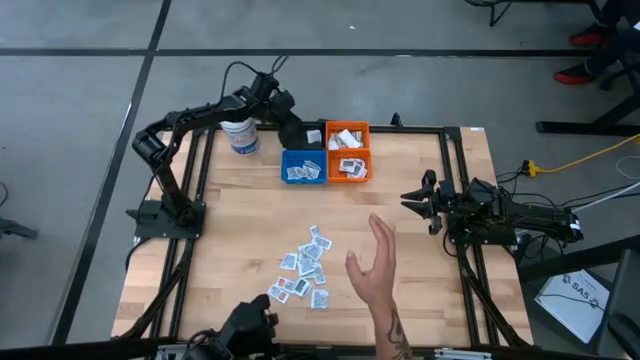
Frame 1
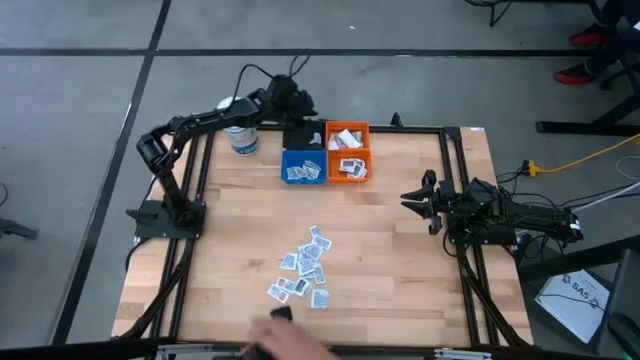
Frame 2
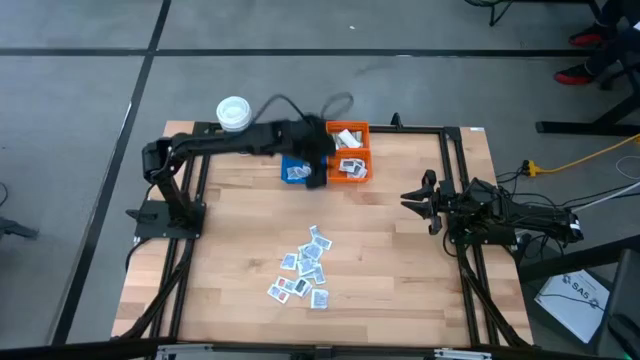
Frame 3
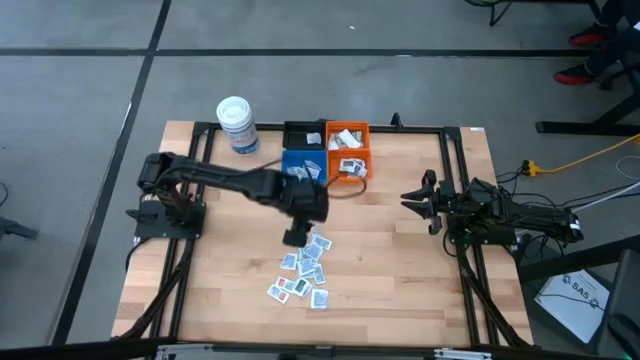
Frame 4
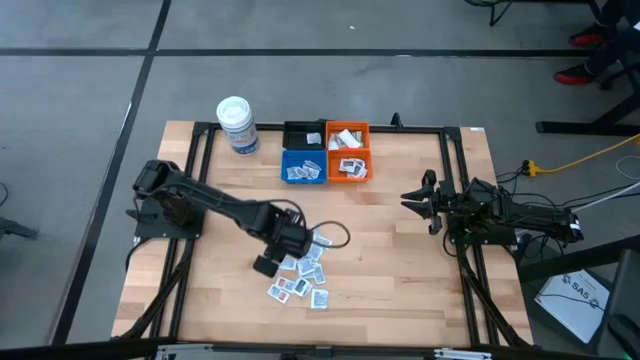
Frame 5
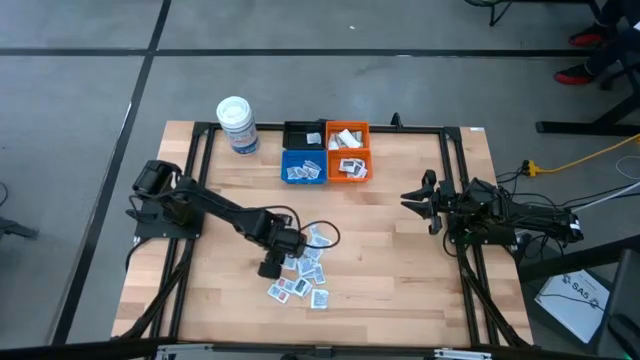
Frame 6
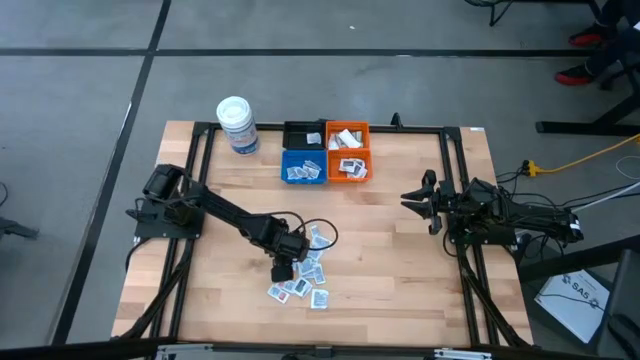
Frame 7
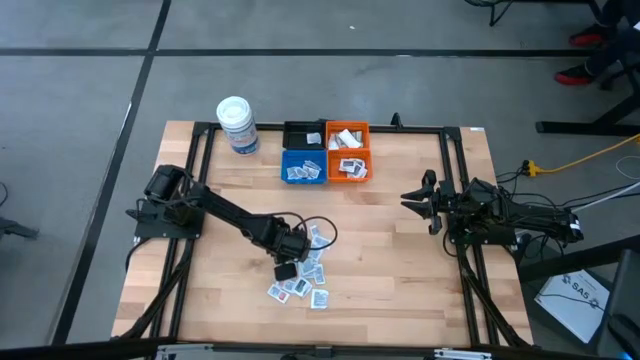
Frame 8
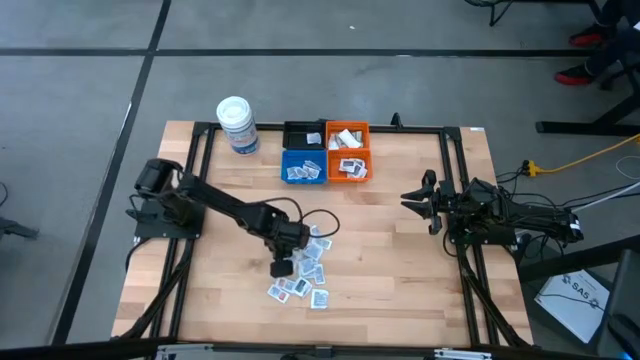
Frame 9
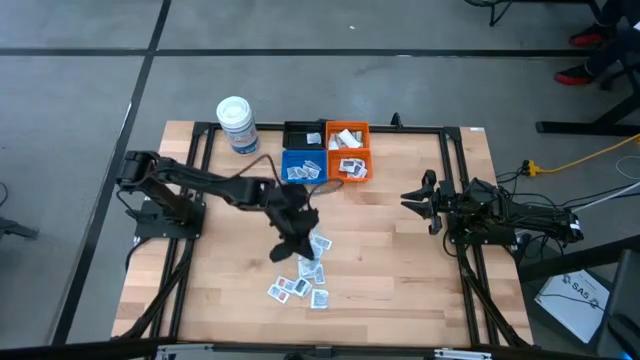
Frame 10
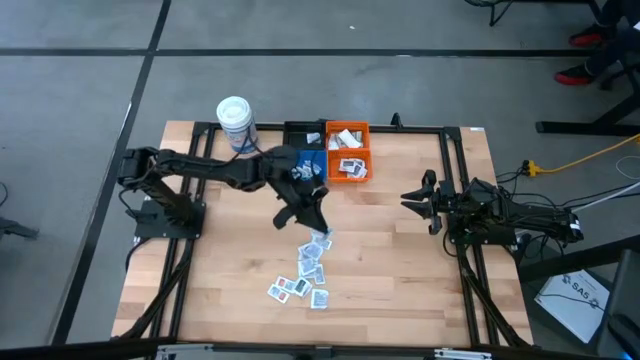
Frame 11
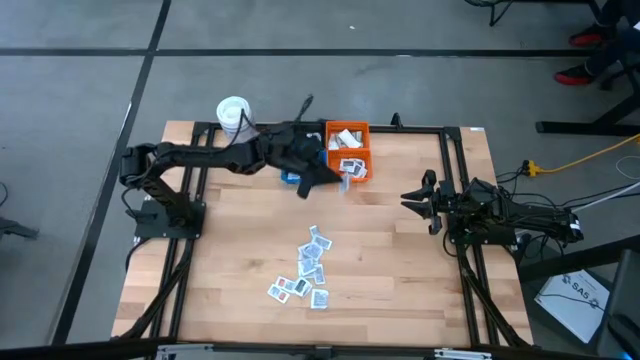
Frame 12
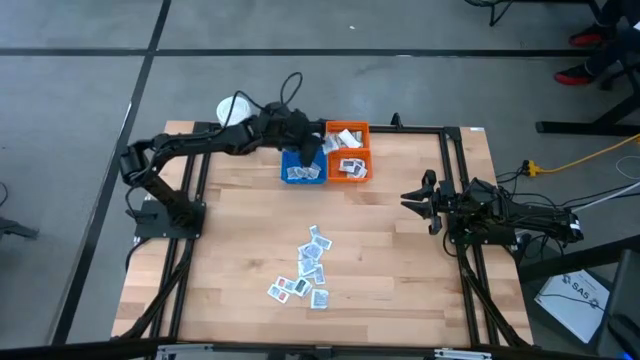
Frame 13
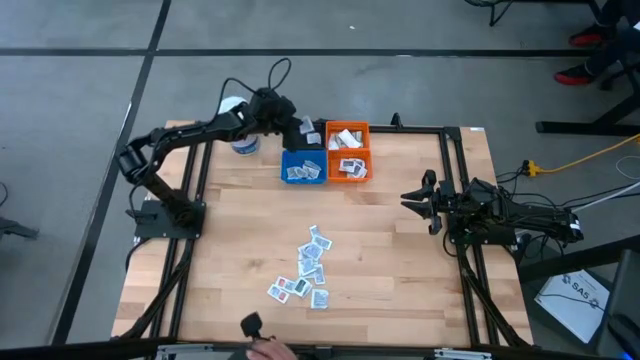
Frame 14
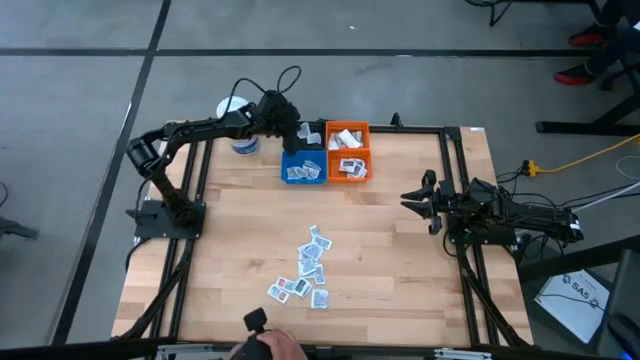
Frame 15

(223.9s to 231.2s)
Task: Pick & Place First Aid Supplies
Put the alcohol pad into the black bin

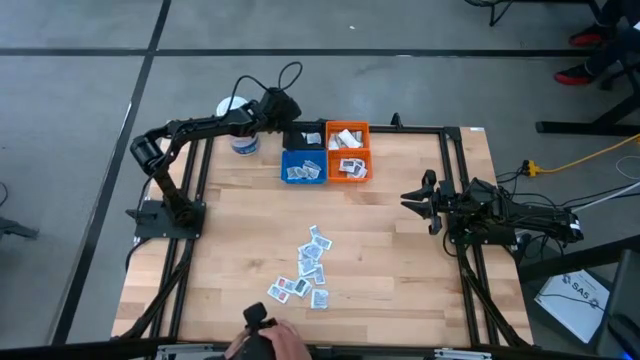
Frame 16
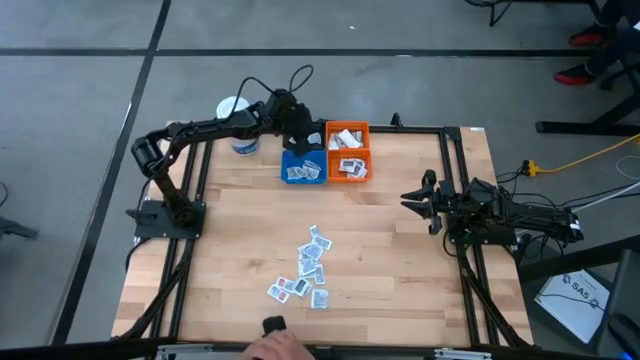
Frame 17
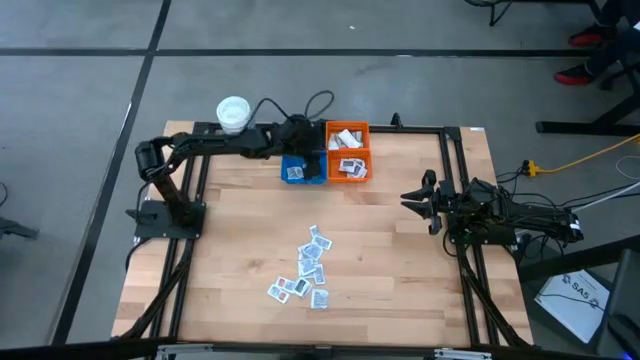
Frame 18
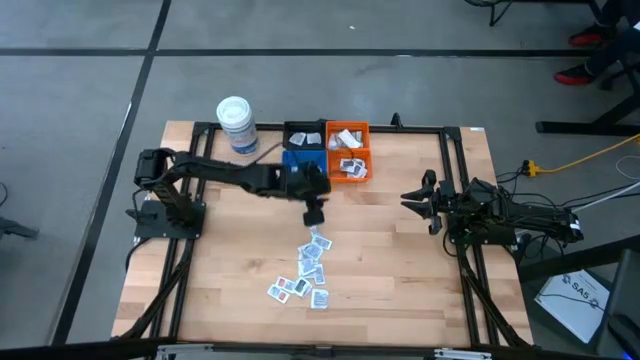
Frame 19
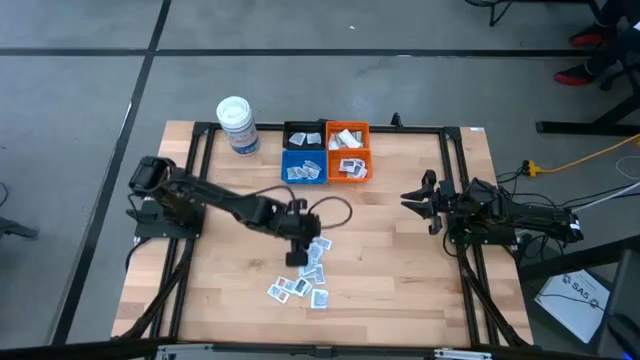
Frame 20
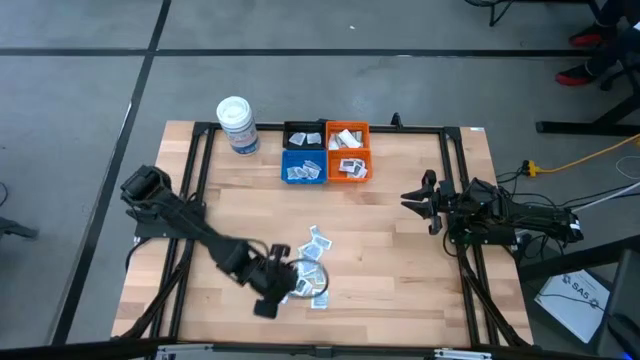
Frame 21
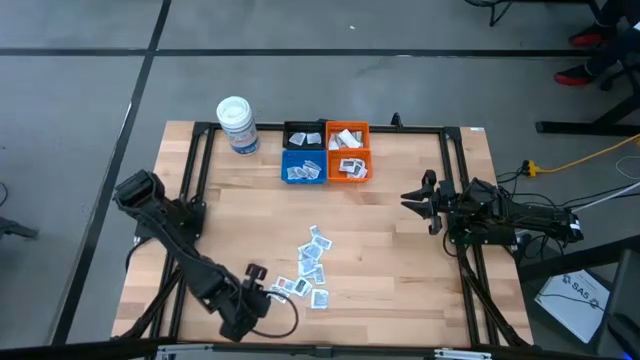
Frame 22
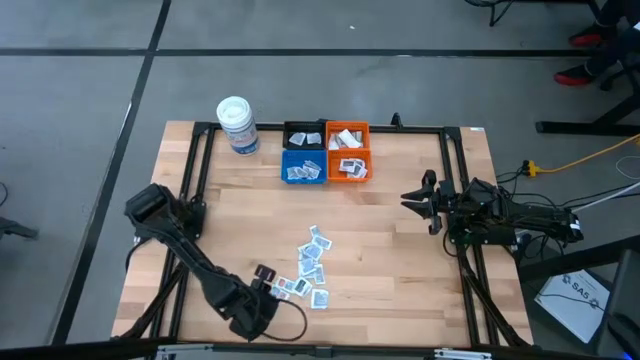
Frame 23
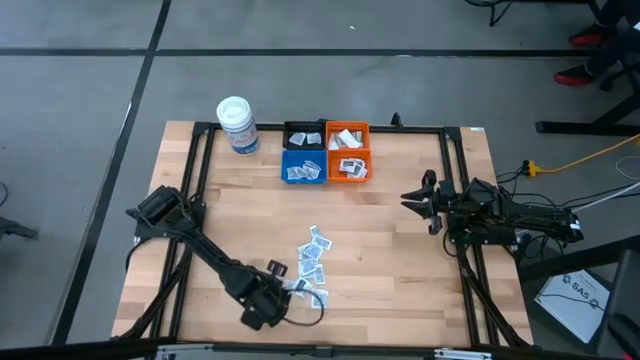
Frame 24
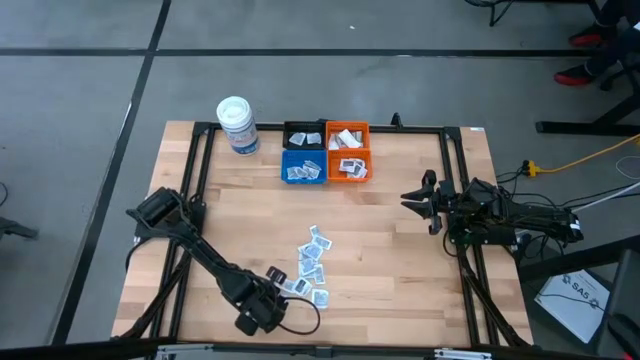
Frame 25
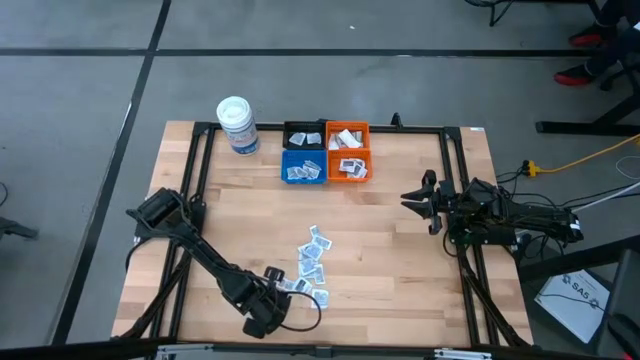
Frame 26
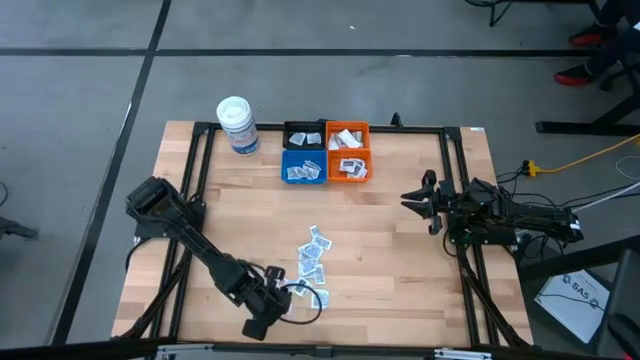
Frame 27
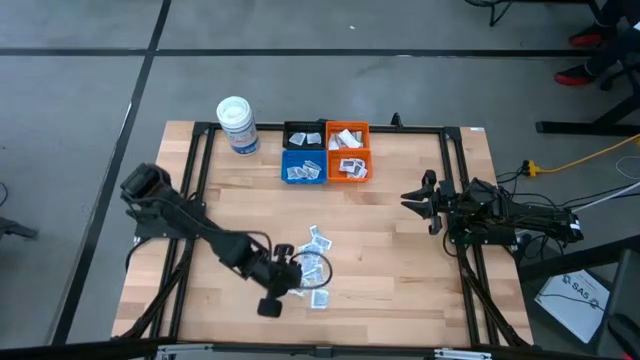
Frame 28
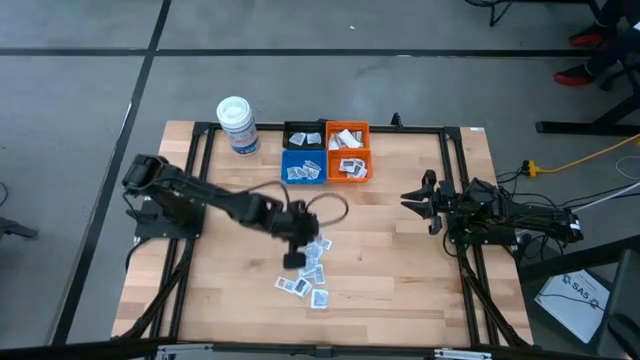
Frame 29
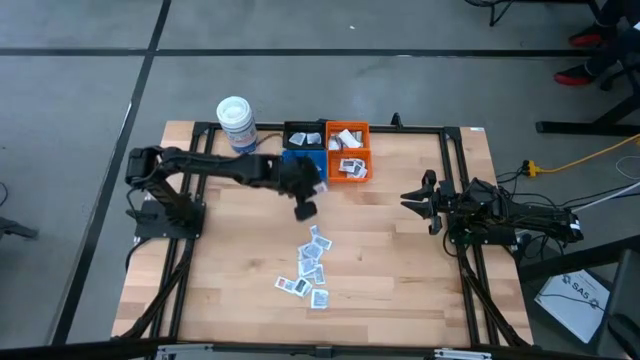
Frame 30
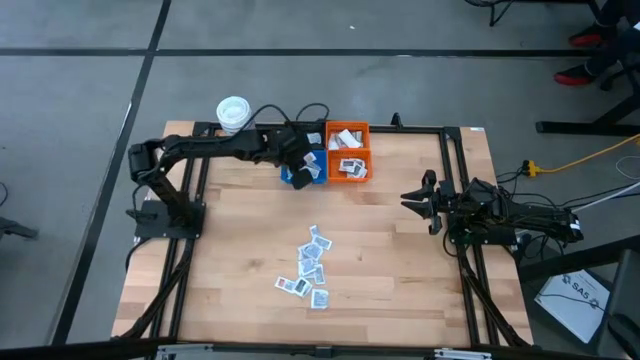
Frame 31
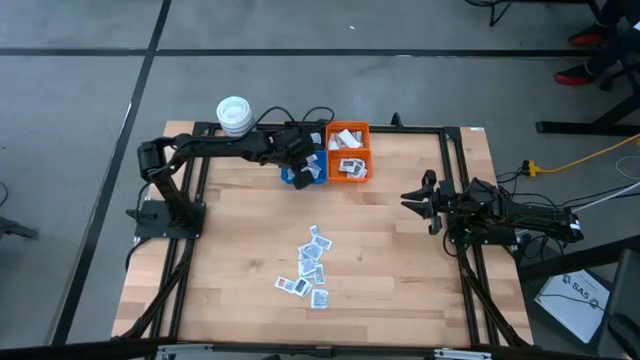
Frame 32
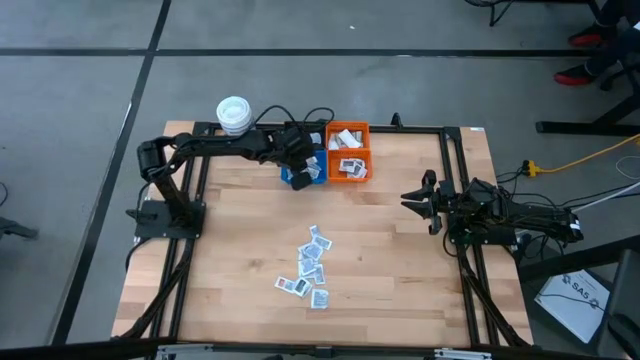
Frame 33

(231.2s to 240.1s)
Put the ointment pack into the blue bin

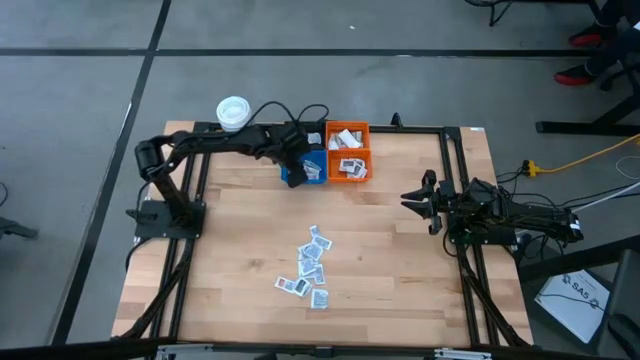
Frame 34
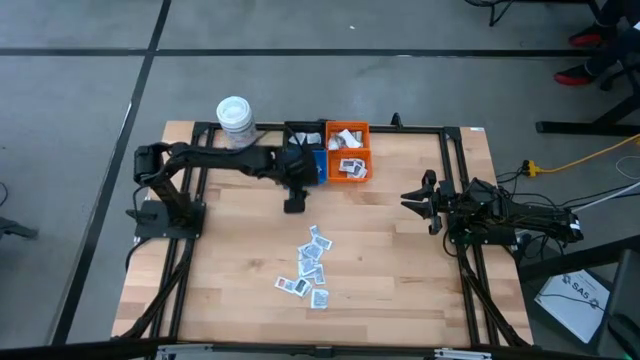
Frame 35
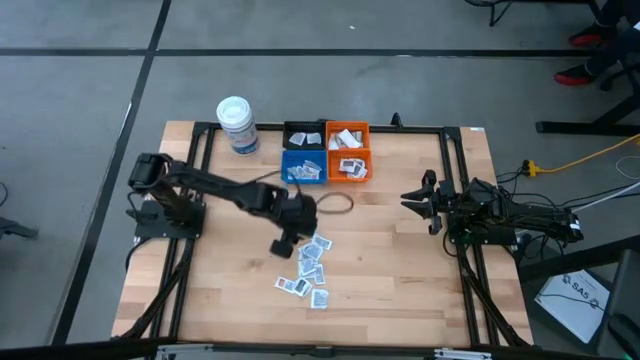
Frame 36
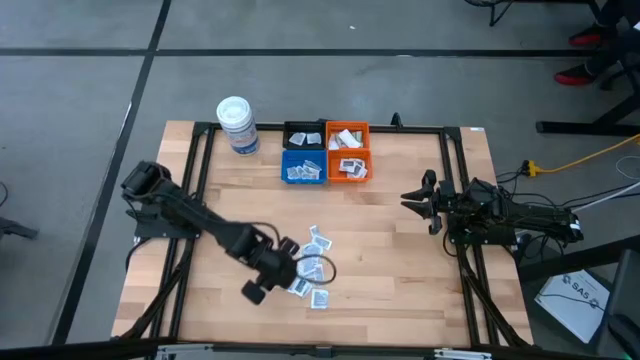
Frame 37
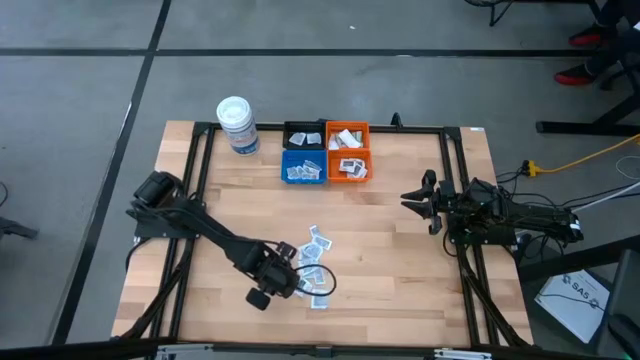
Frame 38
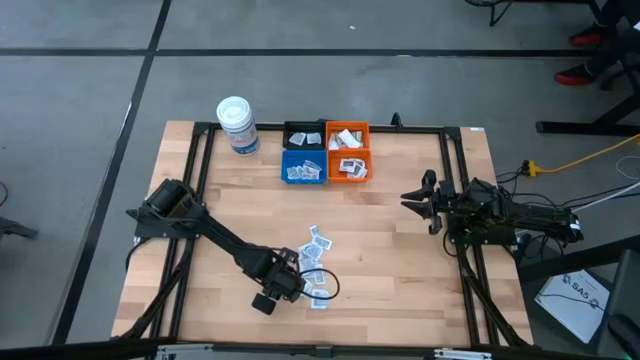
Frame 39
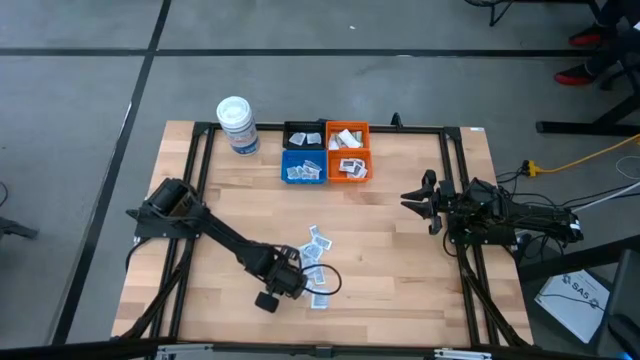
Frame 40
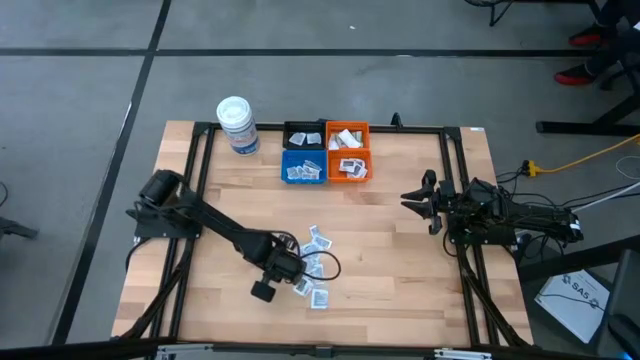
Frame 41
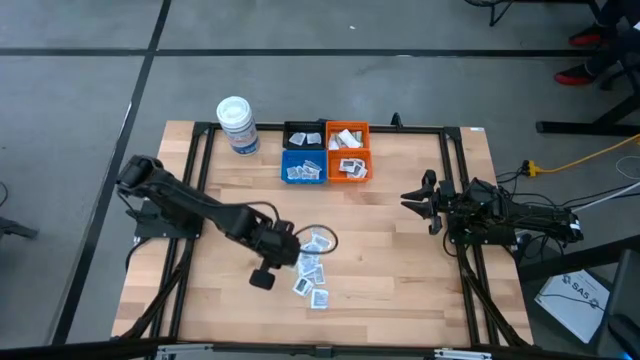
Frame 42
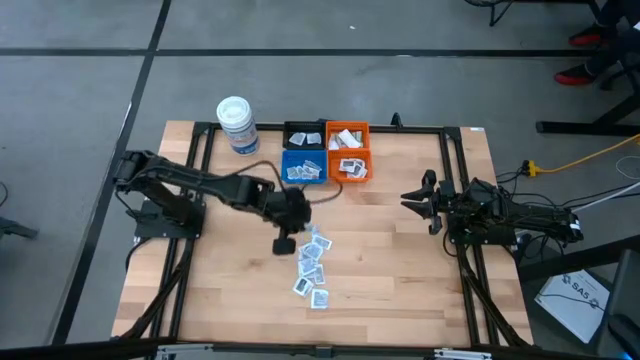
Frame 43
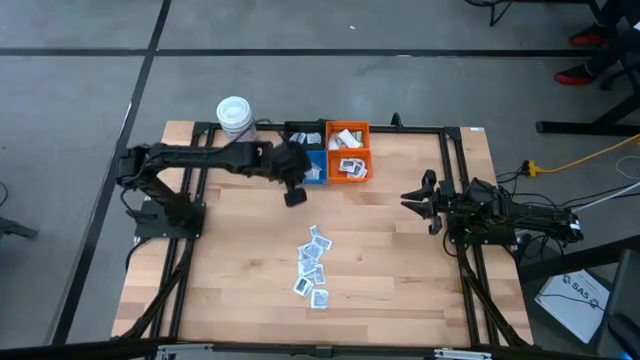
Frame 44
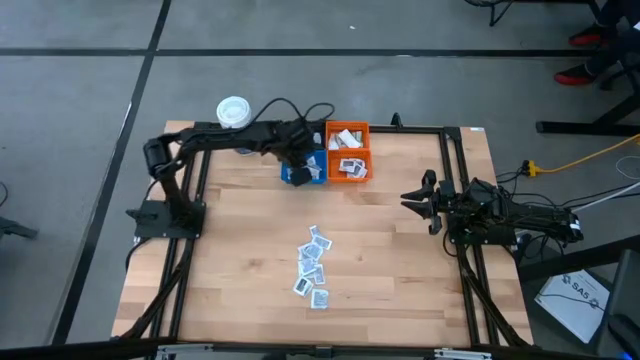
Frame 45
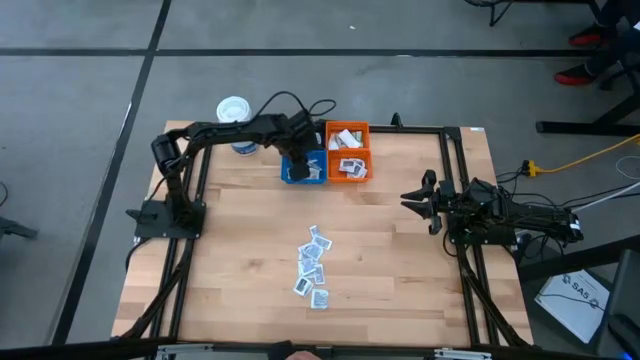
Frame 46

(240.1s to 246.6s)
Put the ointment pack into the blue bin
